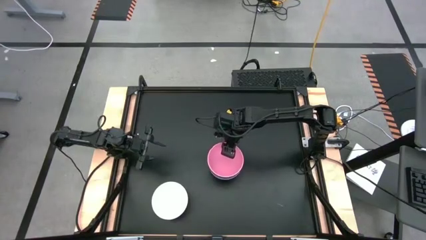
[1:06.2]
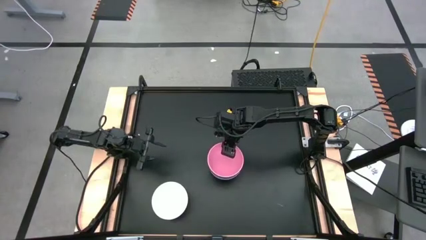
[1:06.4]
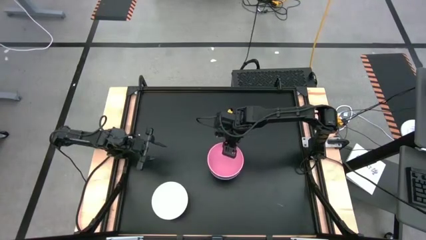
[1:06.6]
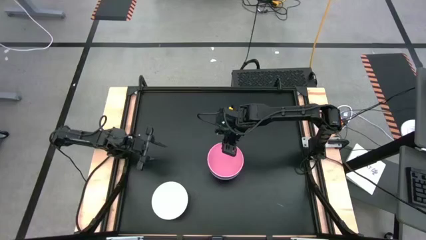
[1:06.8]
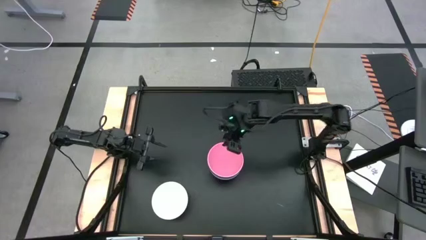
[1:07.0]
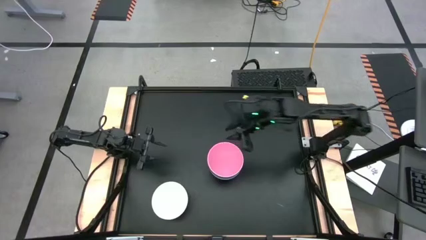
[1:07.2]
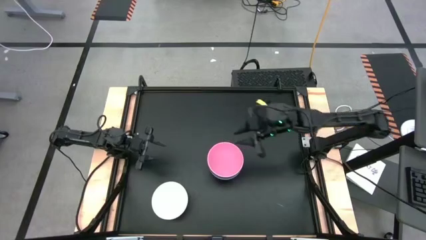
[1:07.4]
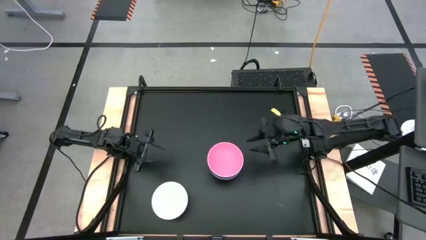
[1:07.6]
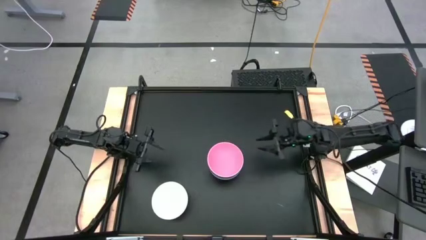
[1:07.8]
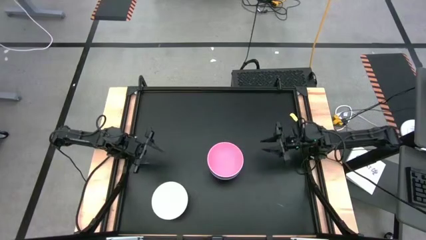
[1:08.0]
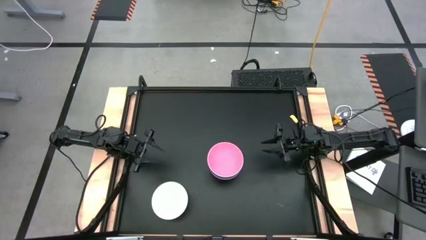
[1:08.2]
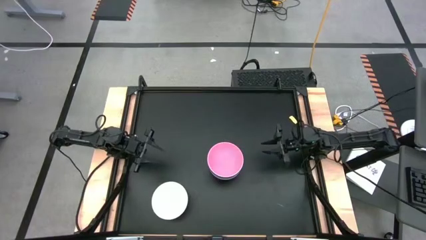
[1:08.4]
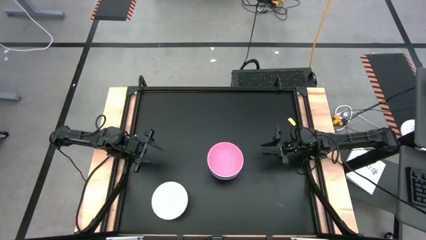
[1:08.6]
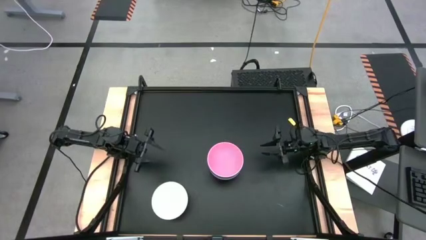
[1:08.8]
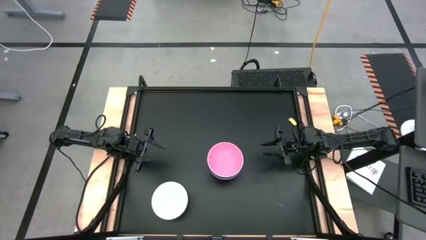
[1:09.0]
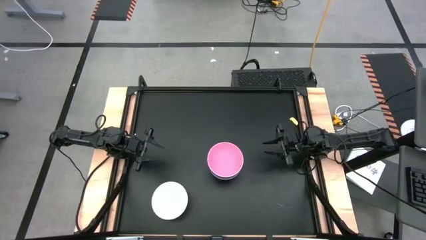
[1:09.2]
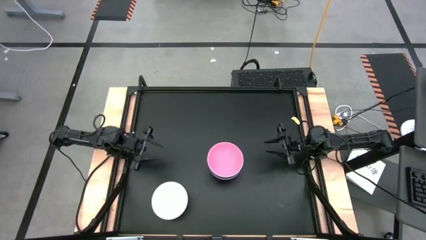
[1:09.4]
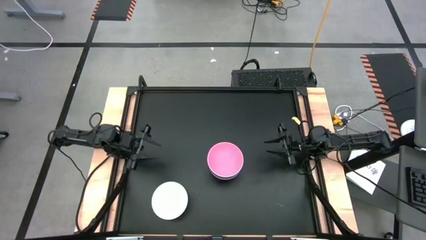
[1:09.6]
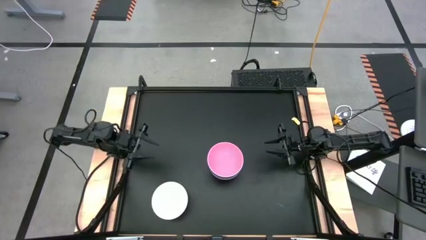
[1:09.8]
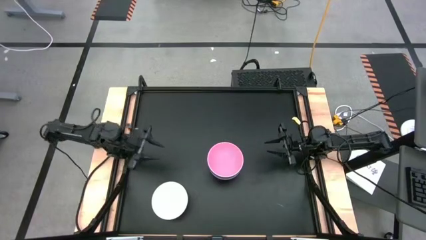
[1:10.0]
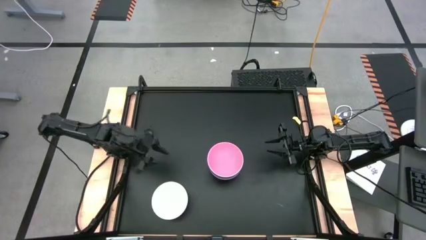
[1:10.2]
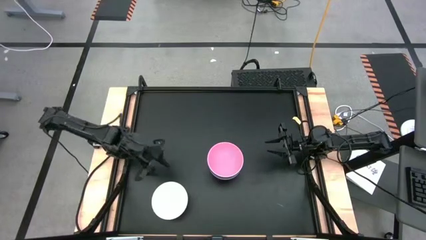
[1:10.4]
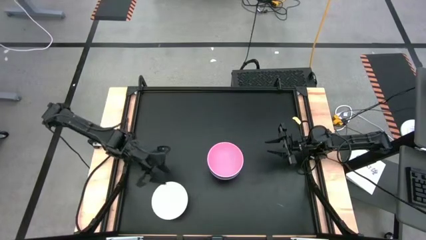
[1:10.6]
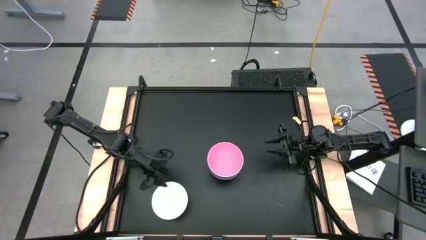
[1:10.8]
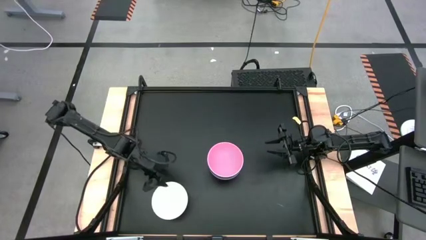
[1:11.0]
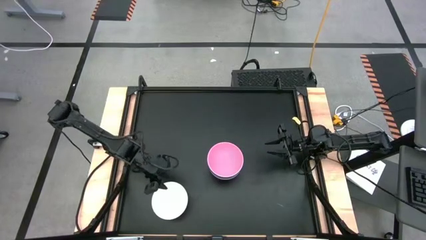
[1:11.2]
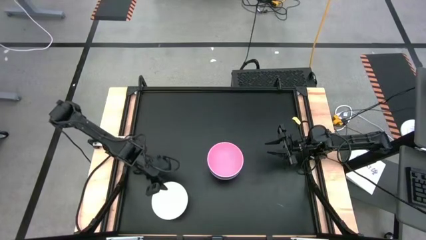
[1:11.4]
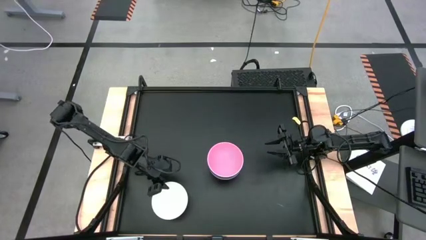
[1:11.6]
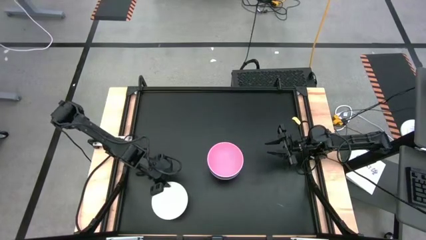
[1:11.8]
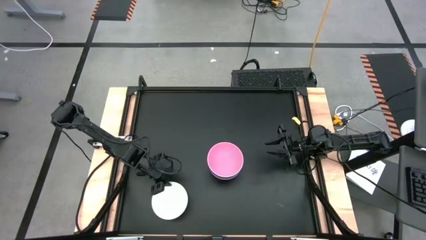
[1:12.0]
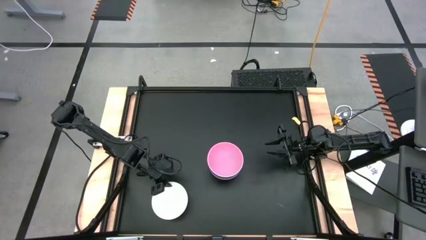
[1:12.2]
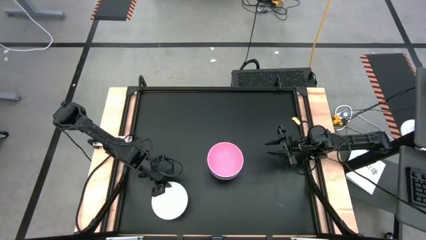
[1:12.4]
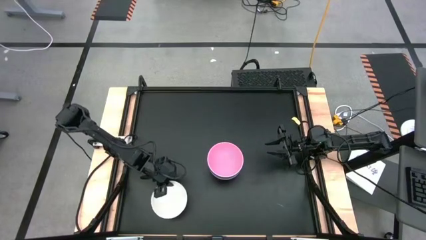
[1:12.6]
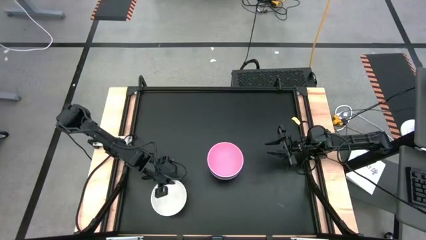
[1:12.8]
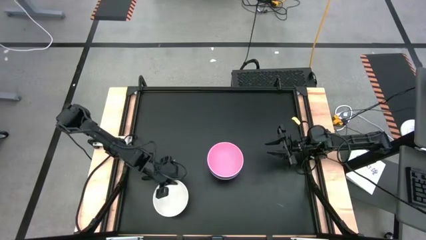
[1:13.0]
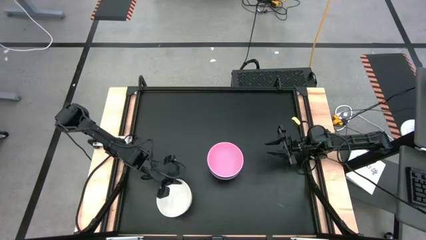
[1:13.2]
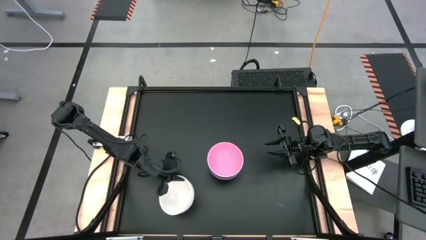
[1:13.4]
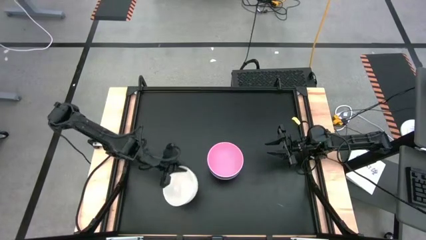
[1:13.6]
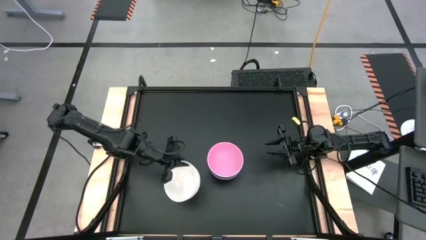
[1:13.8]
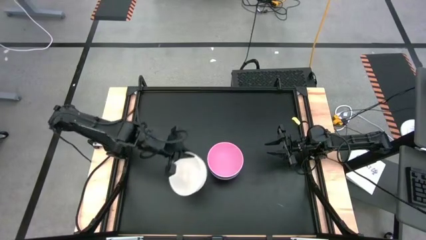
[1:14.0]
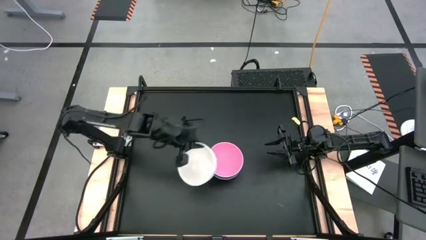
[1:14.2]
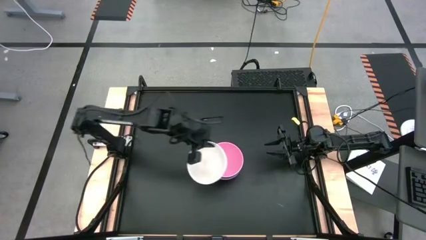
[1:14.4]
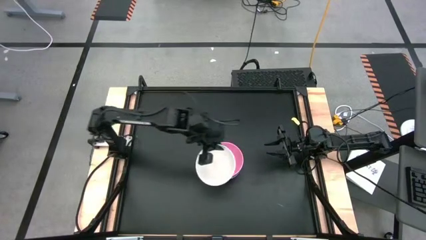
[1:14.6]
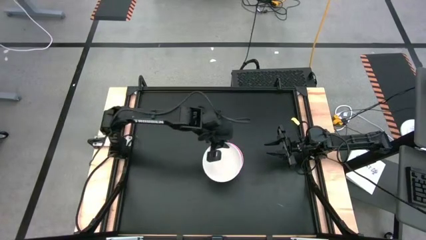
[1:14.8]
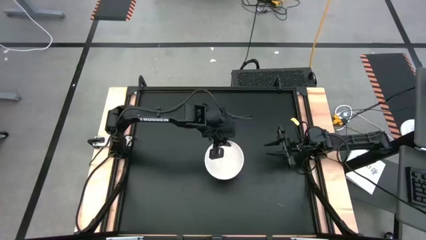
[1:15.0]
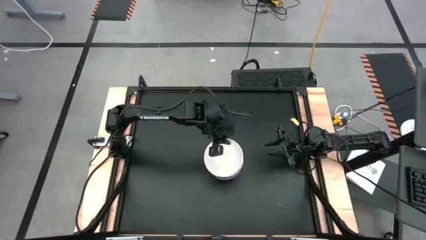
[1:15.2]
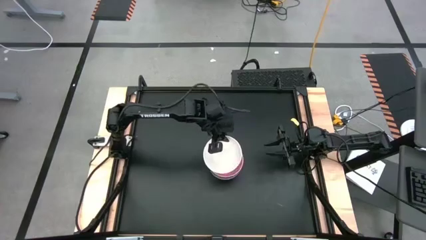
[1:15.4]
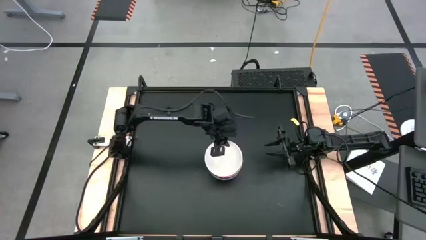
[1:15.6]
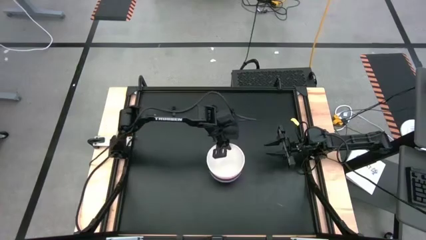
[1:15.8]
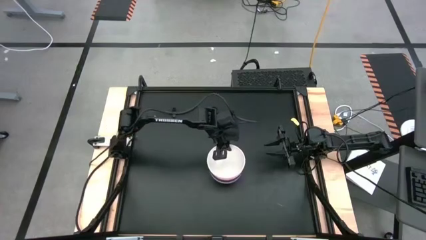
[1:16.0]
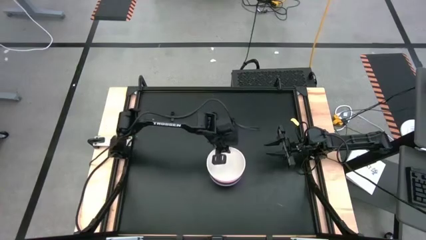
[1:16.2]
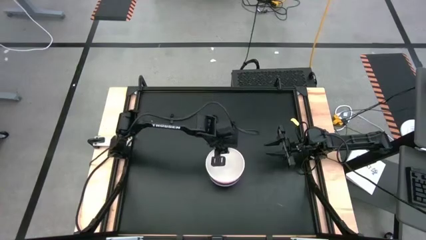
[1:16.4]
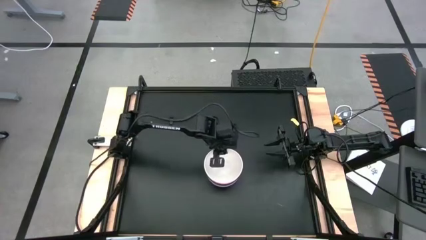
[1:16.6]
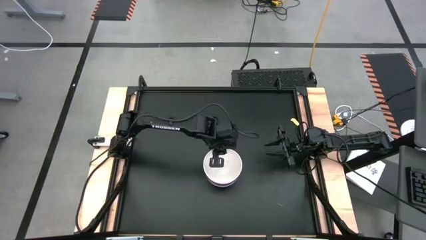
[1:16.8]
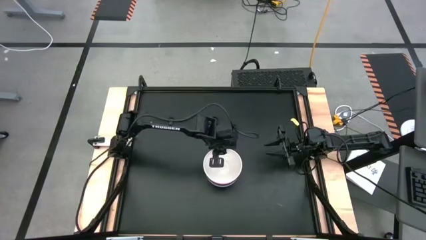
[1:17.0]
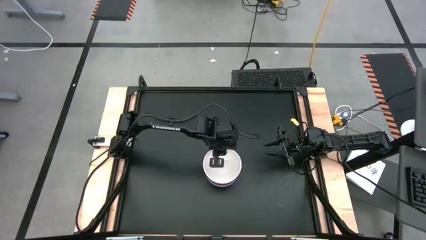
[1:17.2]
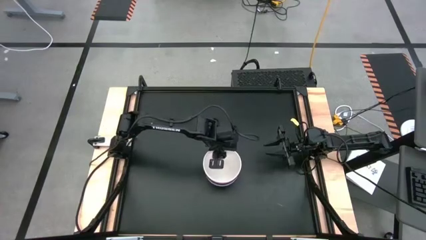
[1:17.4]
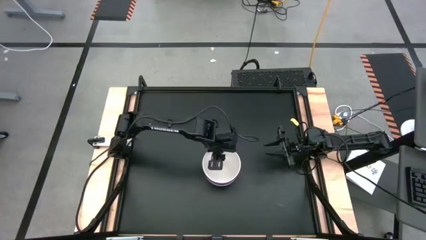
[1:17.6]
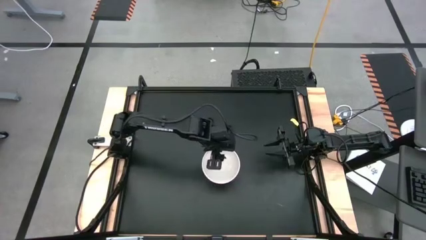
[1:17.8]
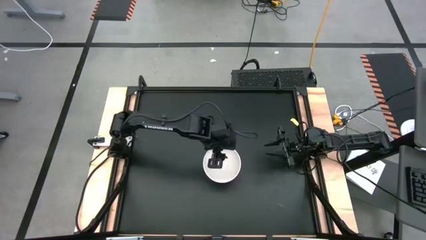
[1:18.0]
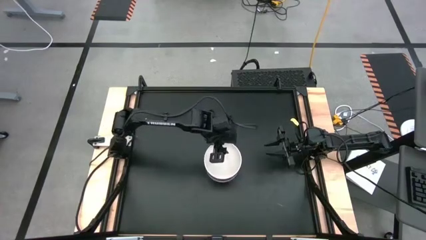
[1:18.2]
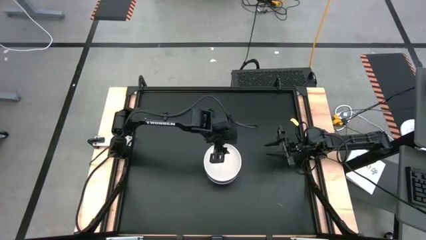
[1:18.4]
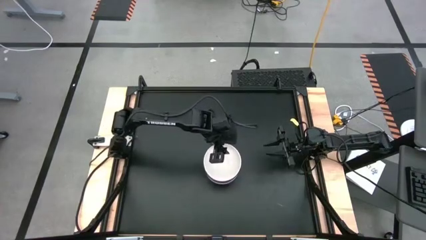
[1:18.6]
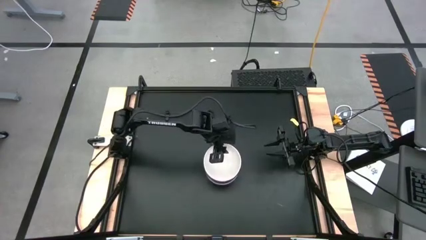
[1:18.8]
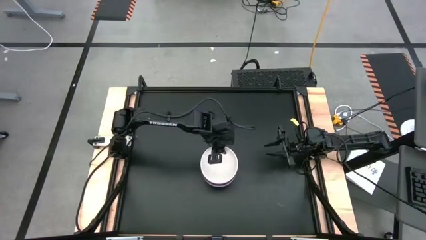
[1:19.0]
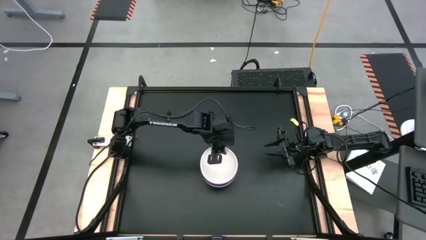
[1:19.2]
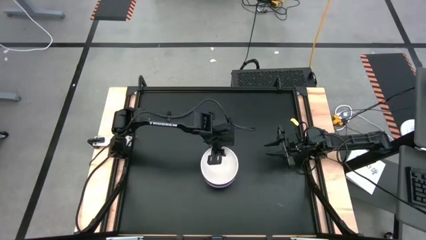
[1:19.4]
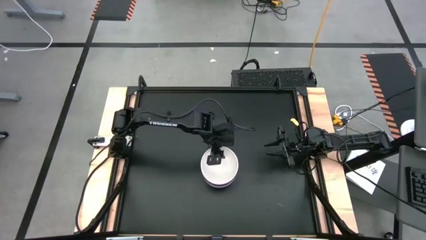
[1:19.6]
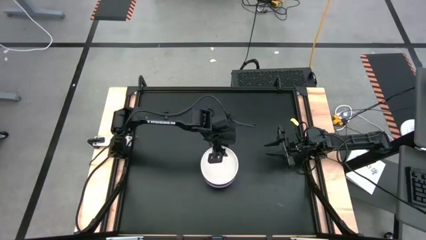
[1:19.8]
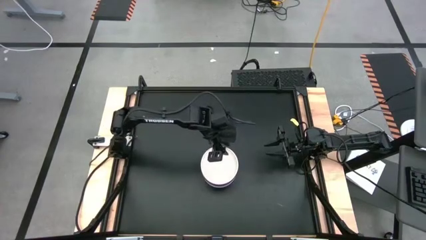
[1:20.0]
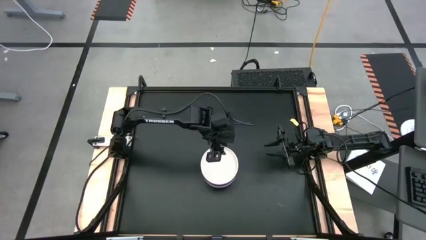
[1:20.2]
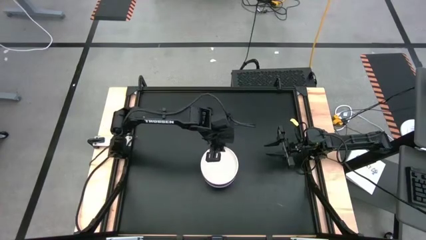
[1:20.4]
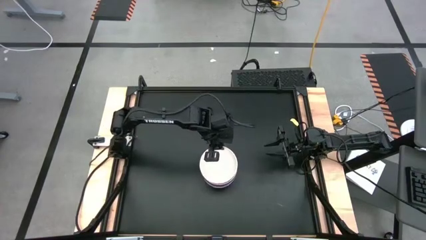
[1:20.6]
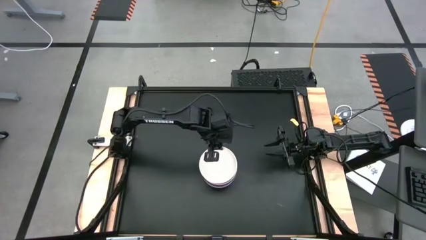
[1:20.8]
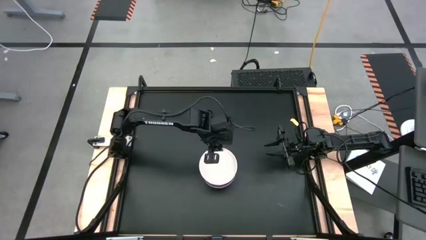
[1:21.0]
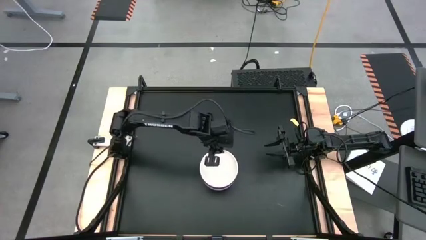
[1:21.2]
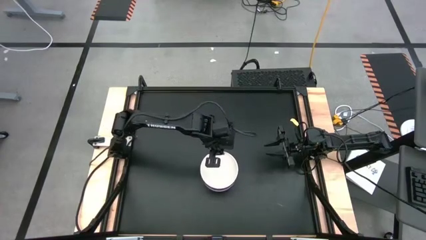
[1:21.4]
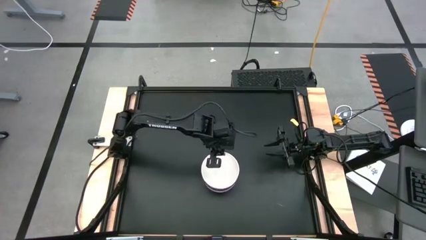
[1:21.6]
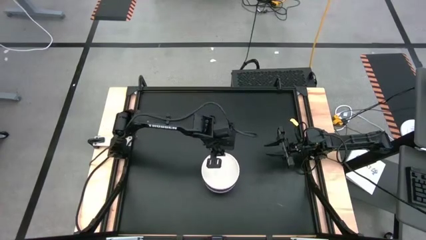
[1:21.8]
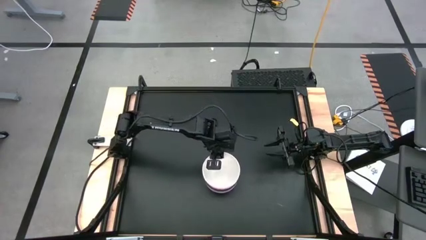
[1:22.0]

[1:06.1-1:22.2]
Task: Nest bowls inside each other
Stack the white bowl on top of the pink bowl

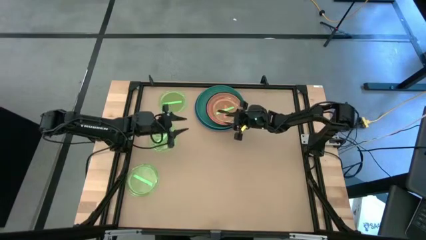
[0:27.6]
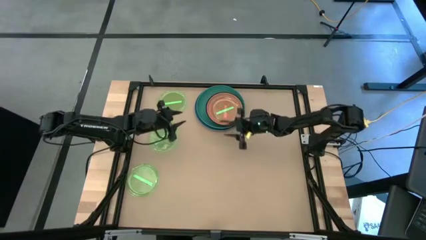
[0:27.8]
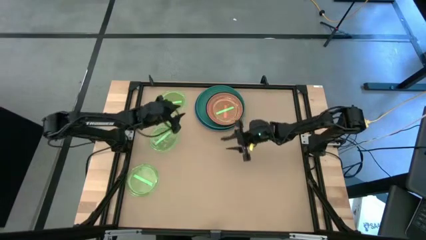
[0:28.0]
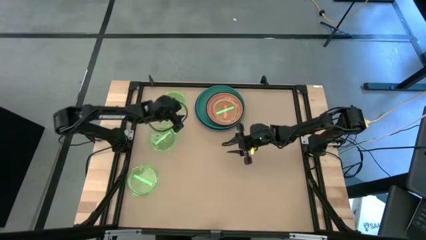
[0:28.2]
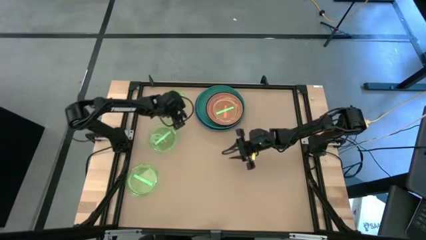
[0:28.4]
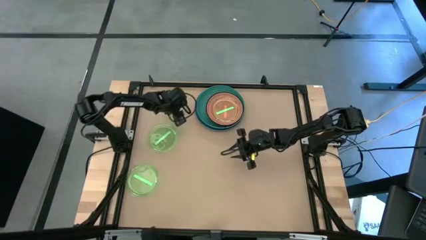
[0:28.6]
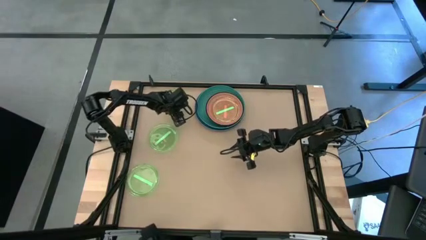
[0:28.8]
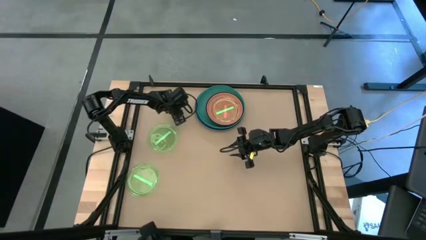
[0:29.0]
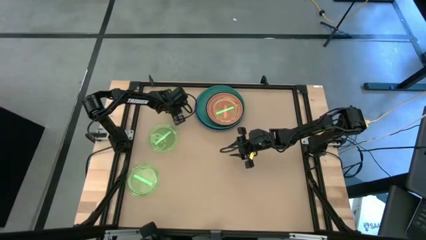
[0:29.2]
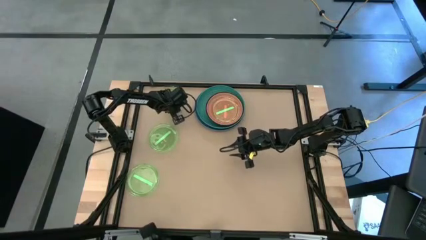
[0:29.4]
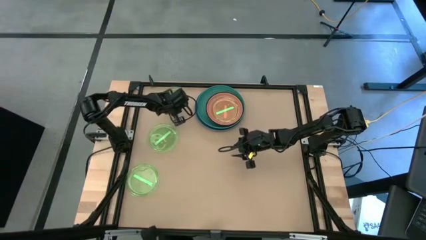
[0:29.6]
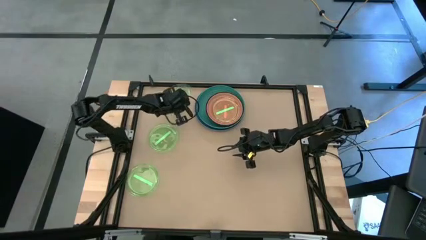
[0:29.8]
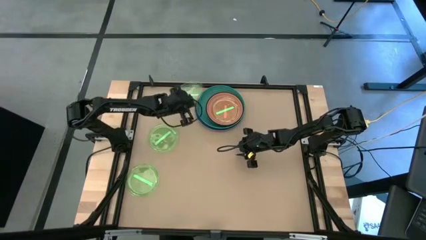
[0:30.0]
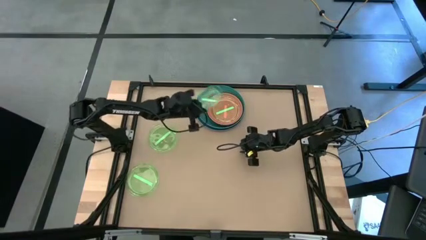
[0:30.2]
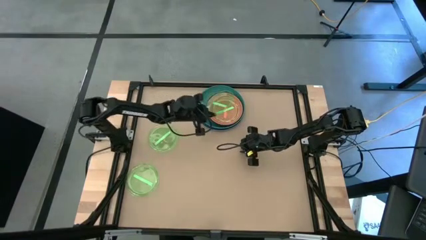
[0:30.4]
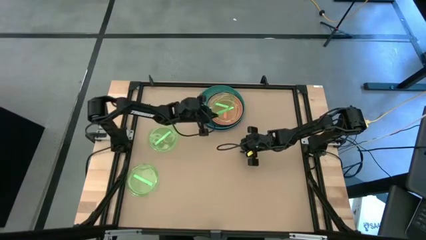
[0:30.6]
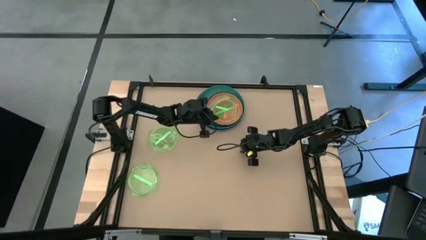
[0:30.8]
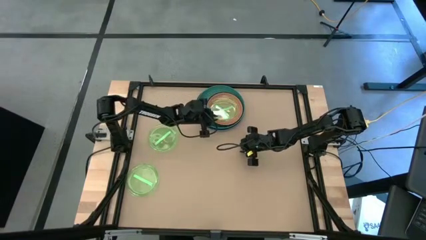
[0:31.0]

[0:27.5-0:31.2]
Task: Stack plastic plates
Stack the green transparent plate on top of the green transparent plate
